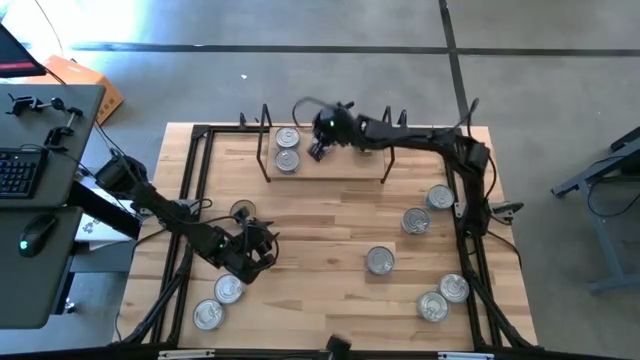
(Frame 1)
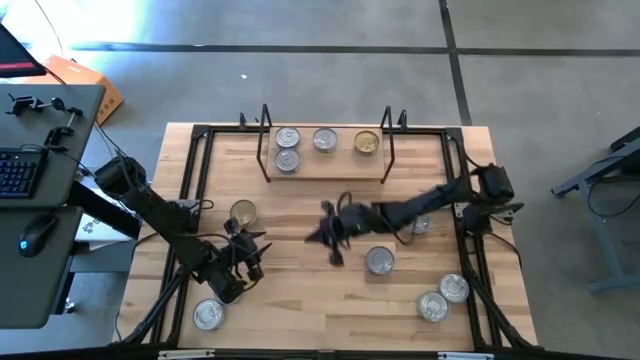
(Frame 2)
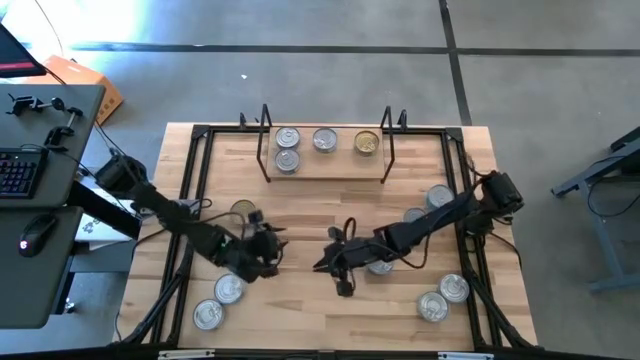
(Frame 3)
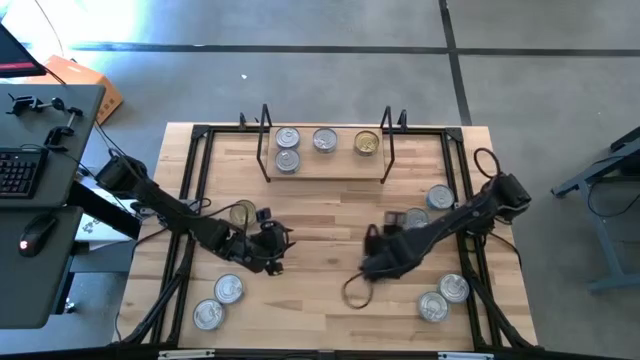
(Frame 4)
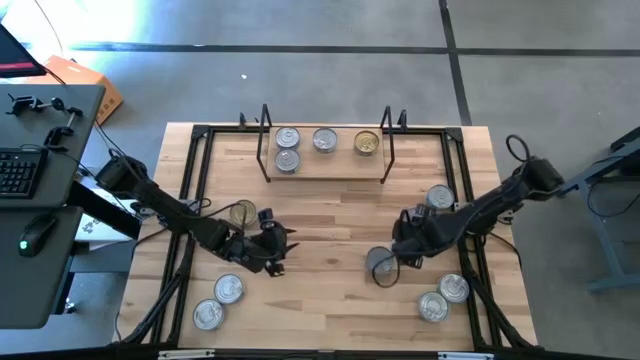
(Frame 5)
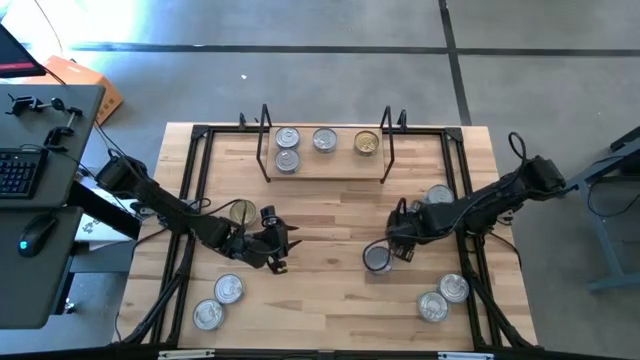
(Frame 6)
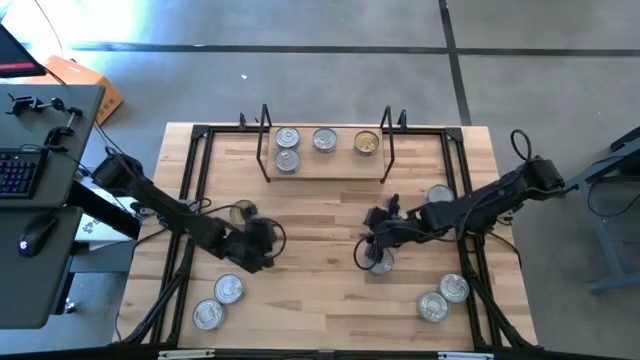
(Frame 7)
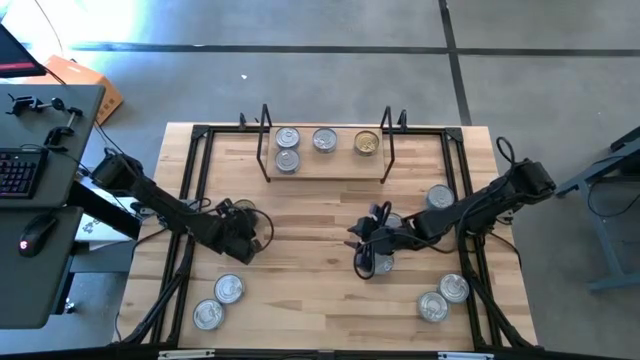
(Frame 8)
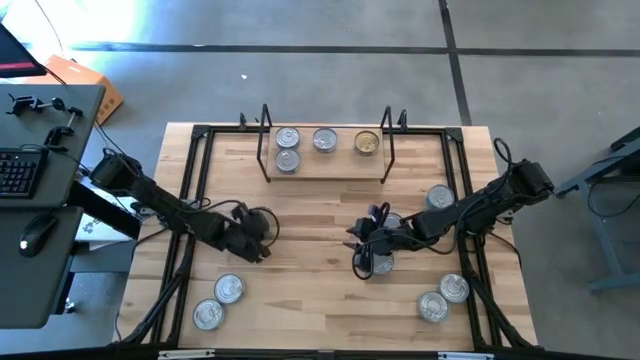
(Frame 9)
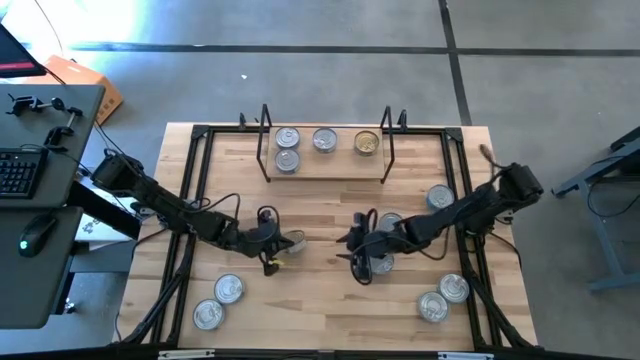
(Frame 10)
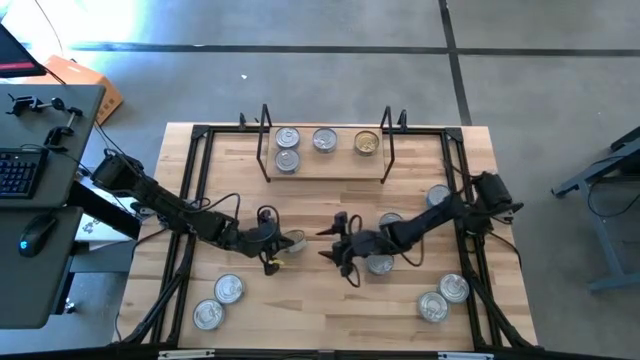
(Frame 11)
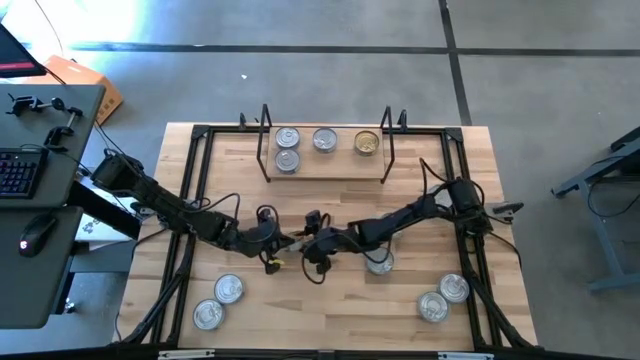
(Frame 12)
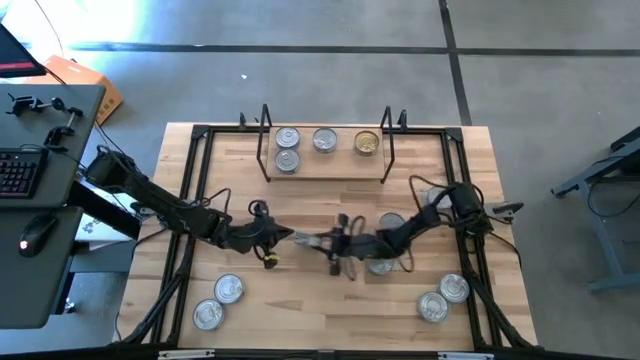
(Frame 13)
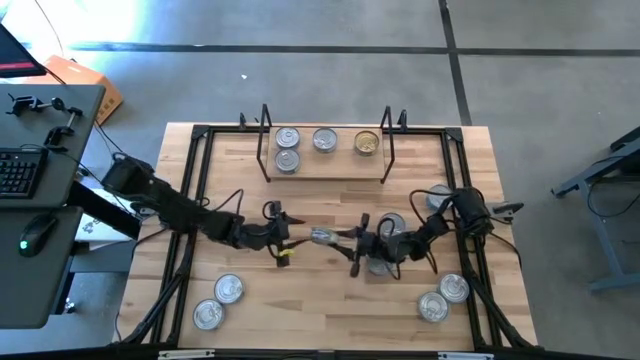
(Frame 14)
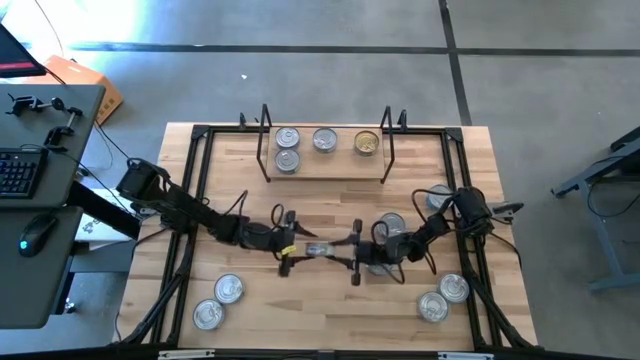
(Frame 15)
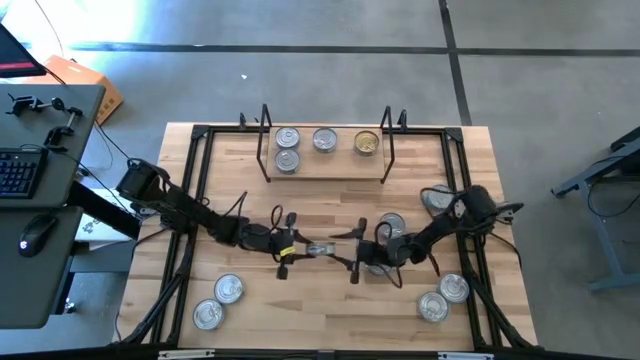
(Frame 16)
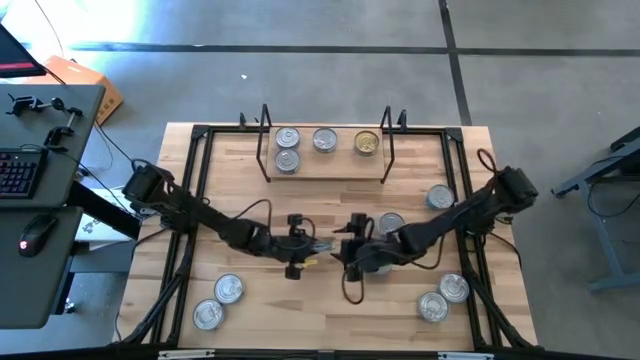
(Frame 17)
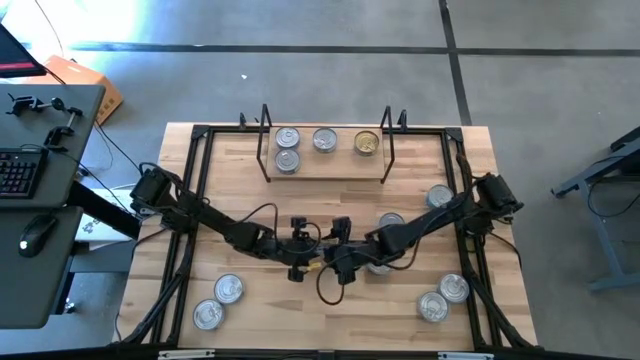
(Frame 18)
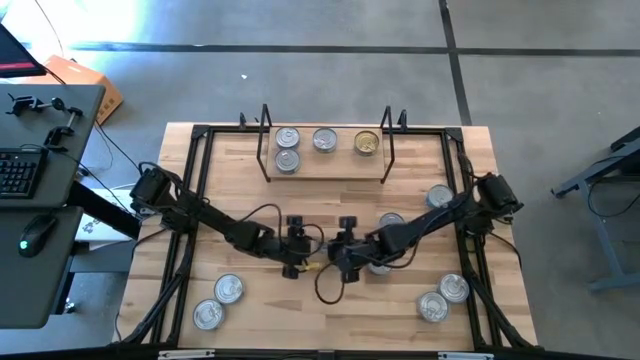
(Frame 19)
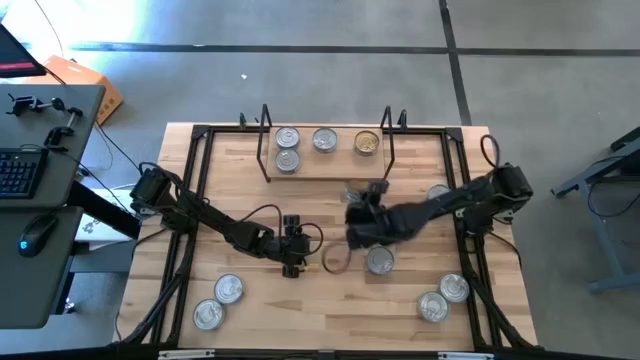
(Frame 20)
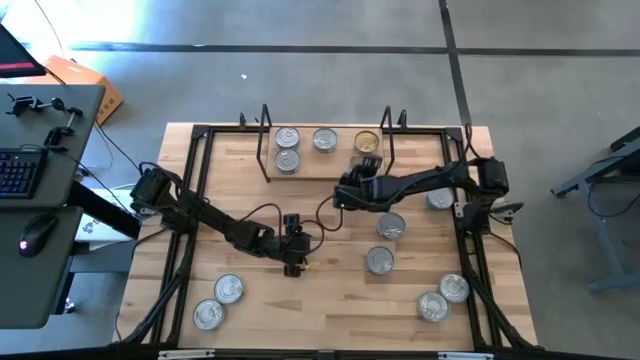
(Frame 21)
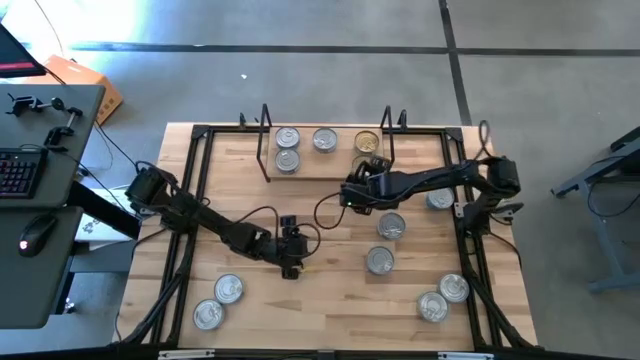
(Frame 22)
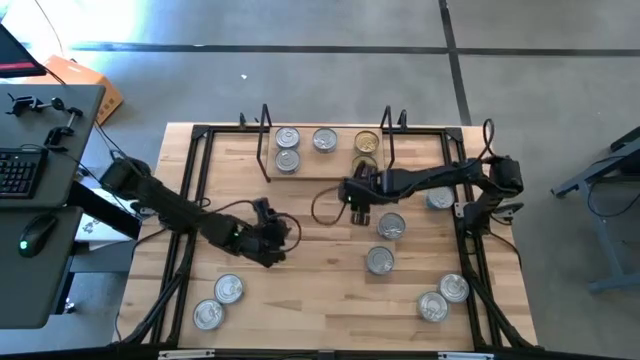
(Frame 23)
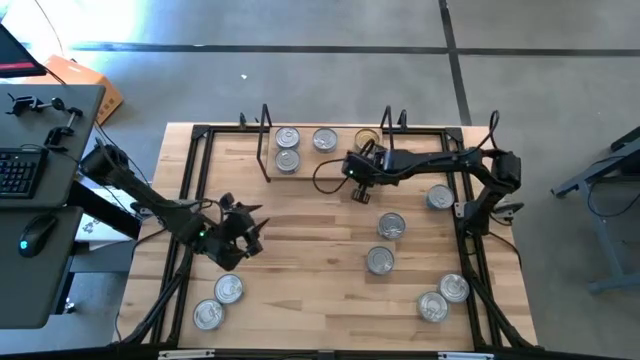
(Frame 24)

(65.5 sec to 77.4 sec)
Task: Stack canned seafood by type on shelf
Put the green tuna can on the shelf aligned with the other green tuna can

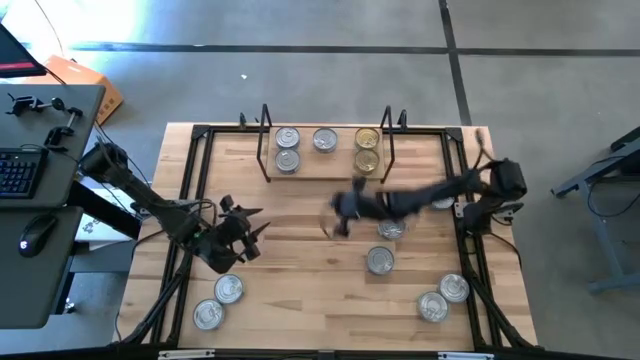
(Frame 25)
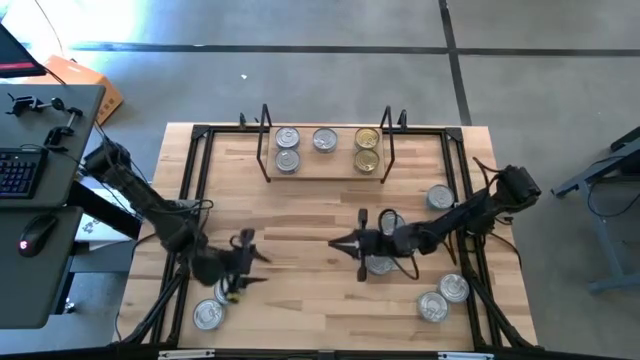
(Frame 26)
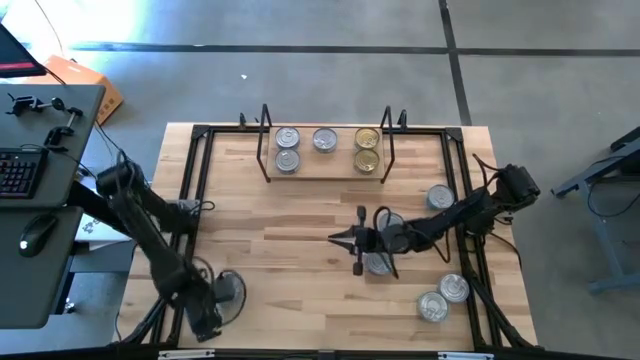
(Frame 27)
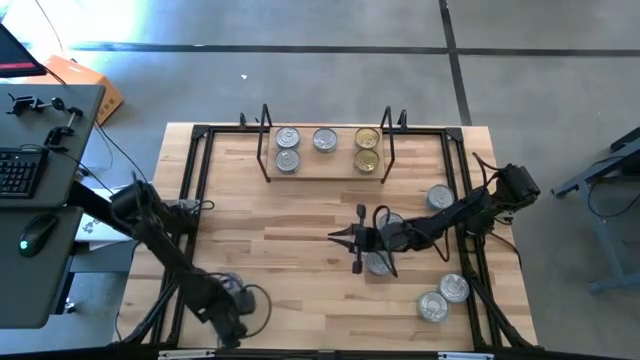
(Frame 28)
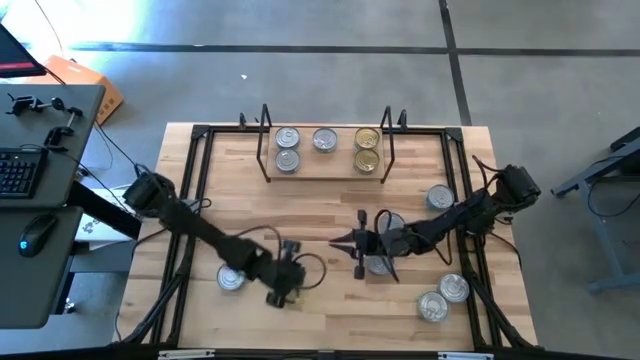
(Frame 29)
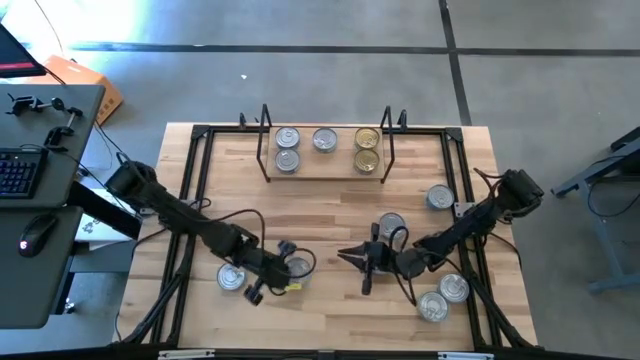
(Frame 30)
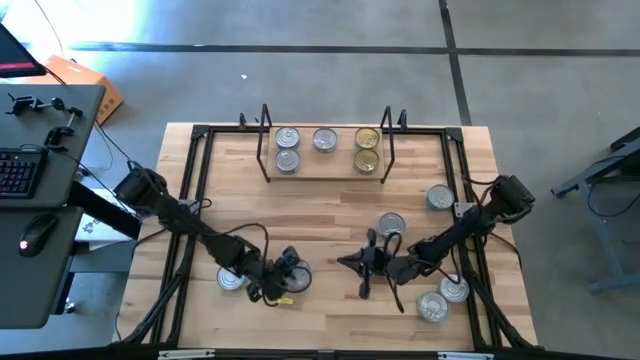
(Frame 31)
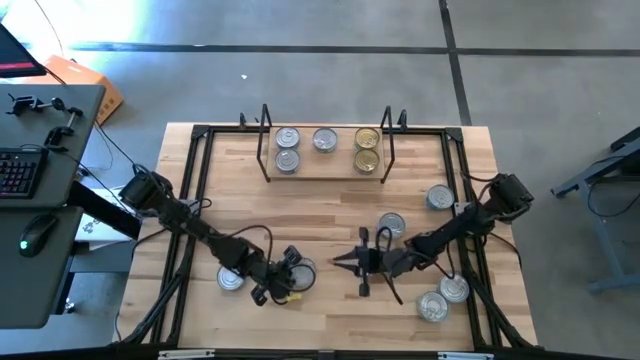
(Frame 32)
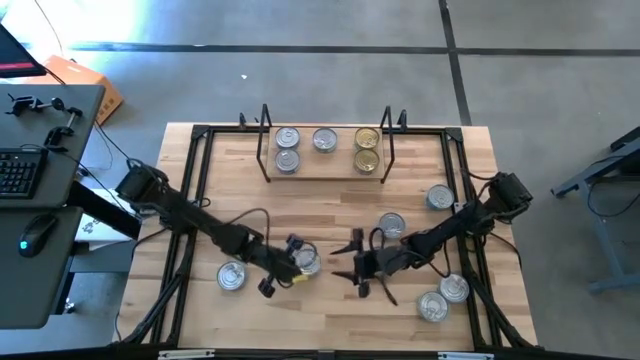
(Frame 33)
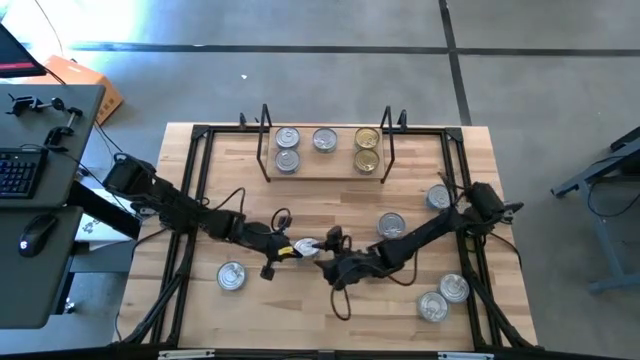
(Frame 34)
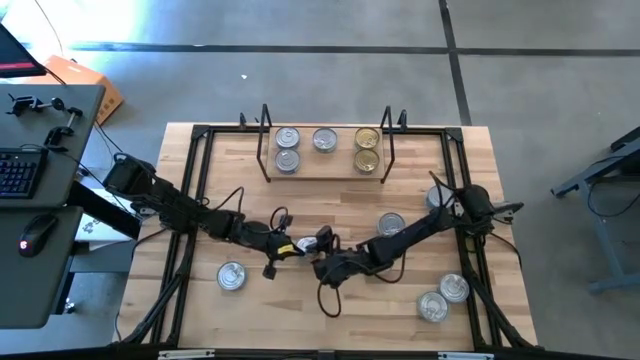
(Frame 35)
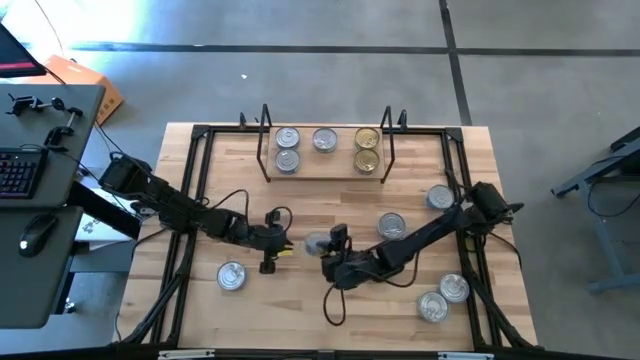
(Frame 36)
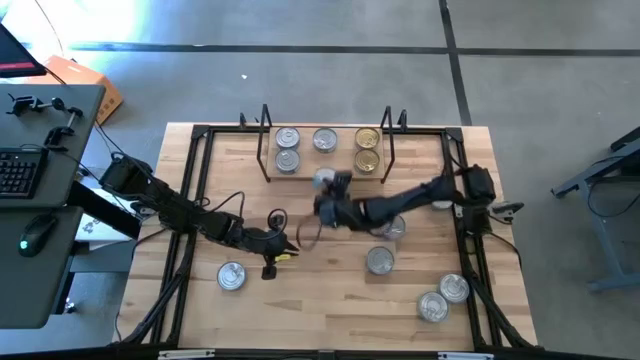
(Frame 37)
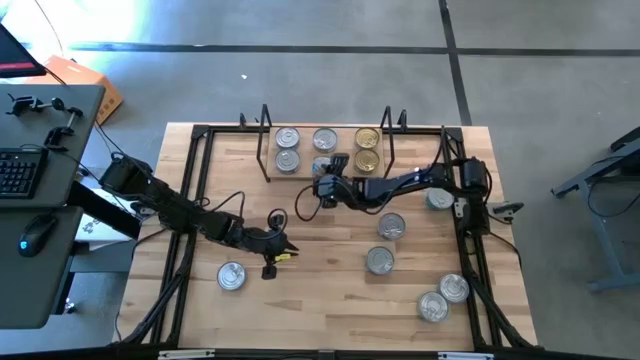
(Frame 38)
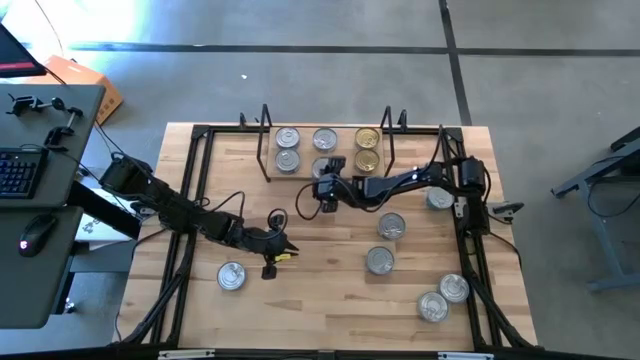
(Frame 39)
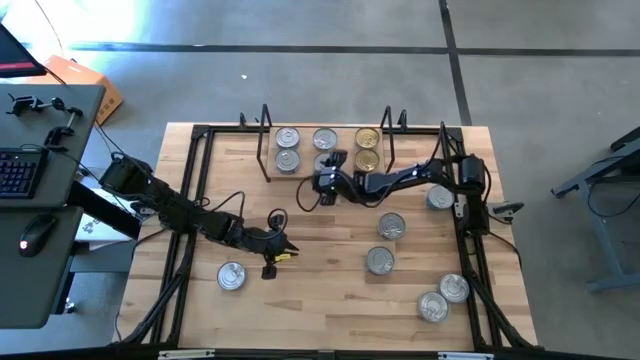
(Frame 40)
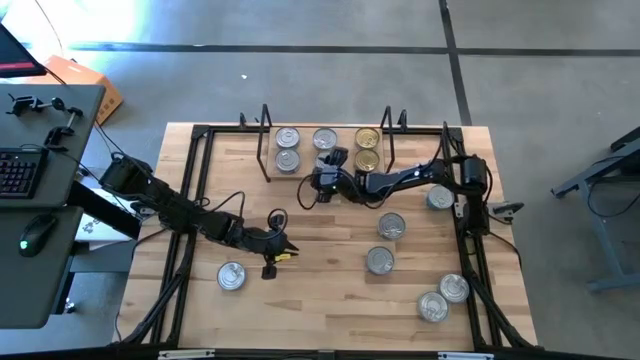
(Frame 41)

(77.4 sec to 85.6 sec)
Put the yellow-blue tuna can on the shelf aligned with the other yellow-blue tuna can
